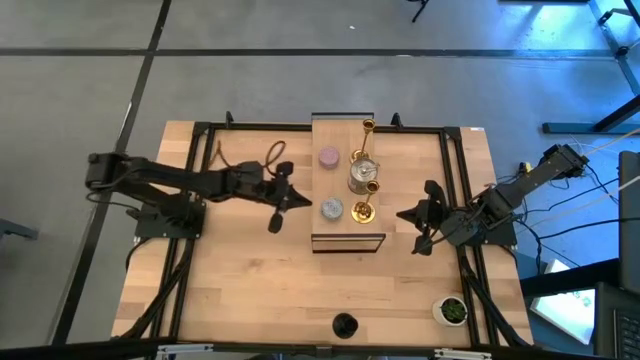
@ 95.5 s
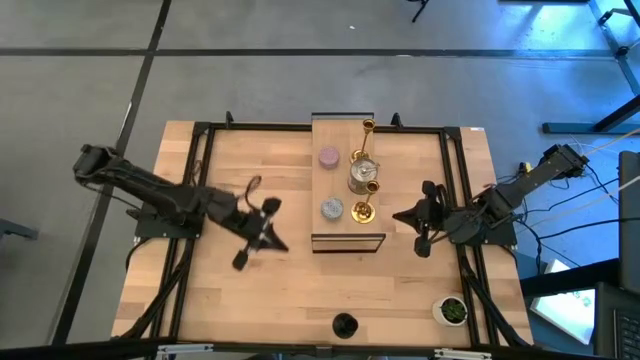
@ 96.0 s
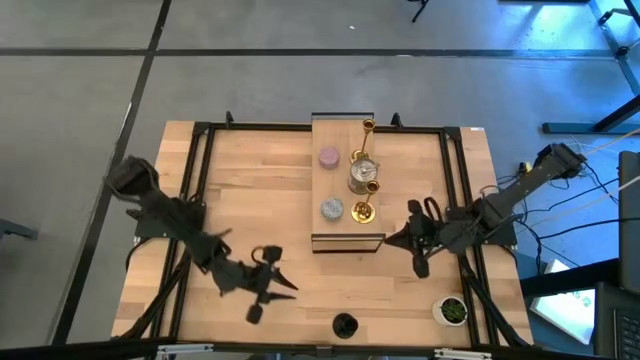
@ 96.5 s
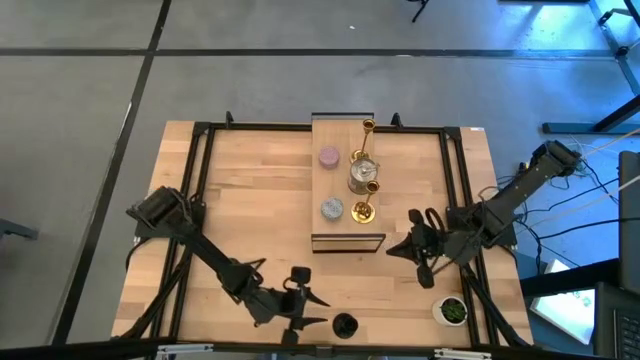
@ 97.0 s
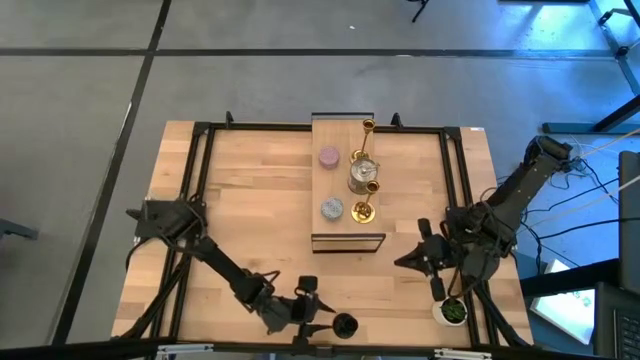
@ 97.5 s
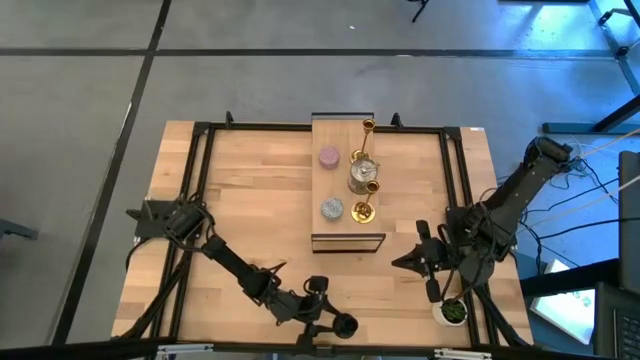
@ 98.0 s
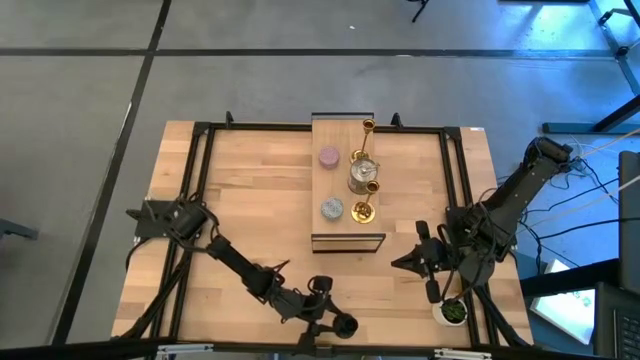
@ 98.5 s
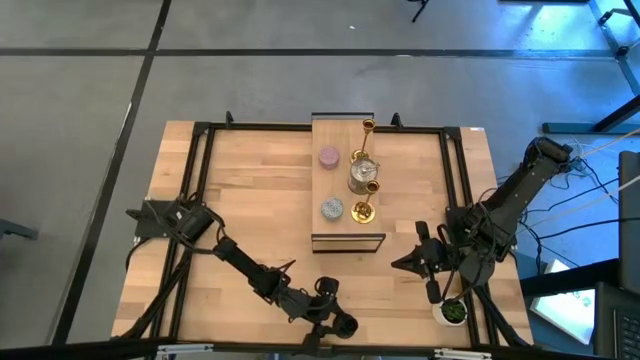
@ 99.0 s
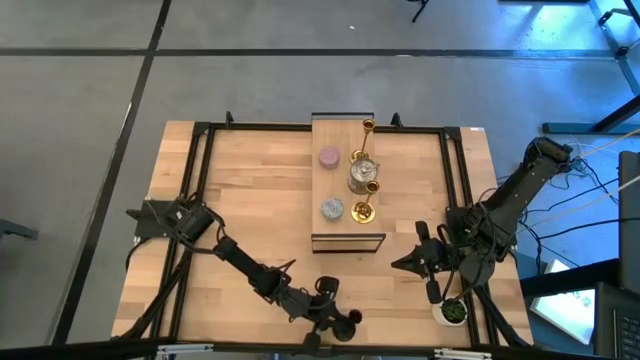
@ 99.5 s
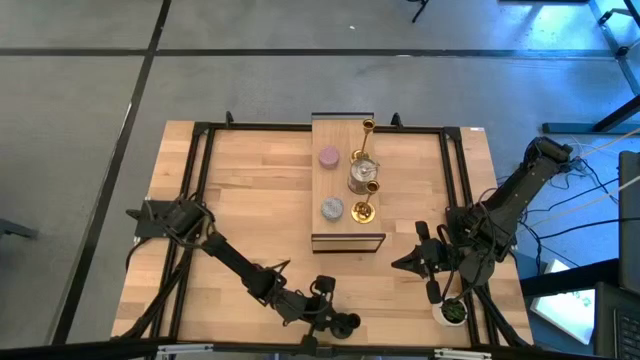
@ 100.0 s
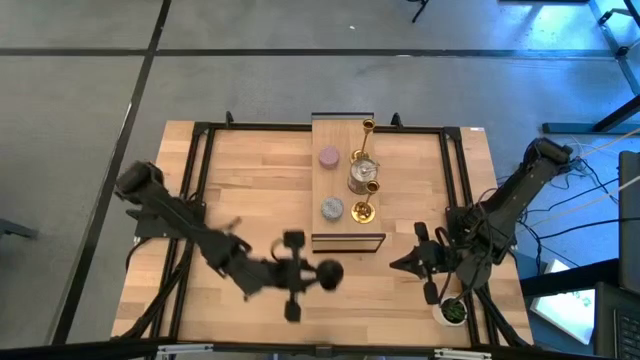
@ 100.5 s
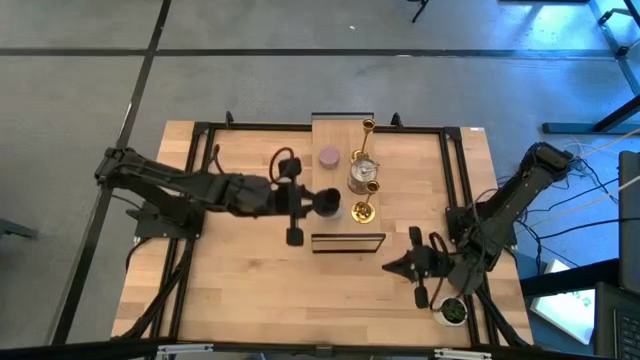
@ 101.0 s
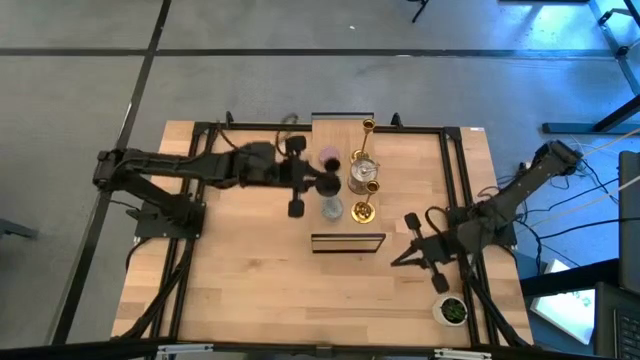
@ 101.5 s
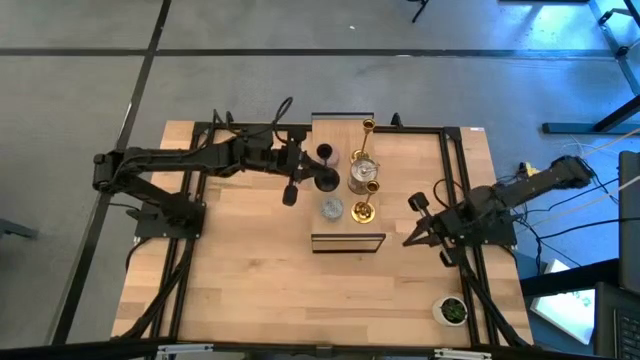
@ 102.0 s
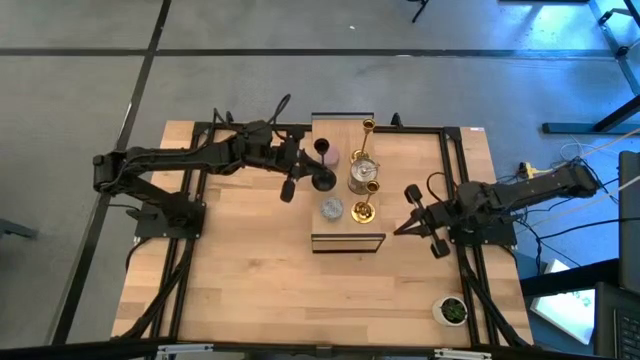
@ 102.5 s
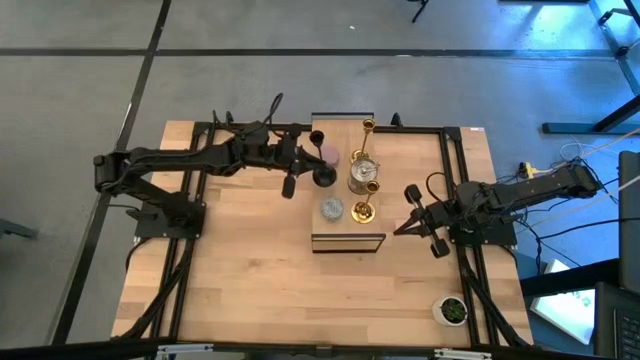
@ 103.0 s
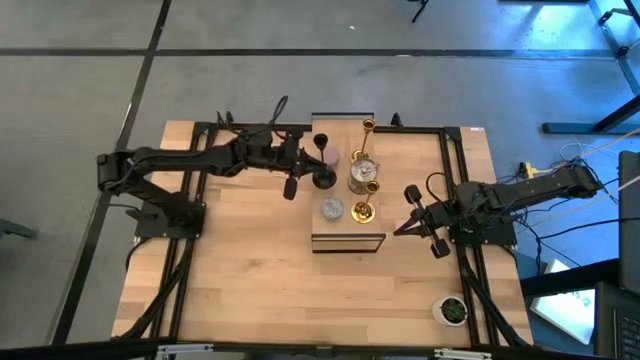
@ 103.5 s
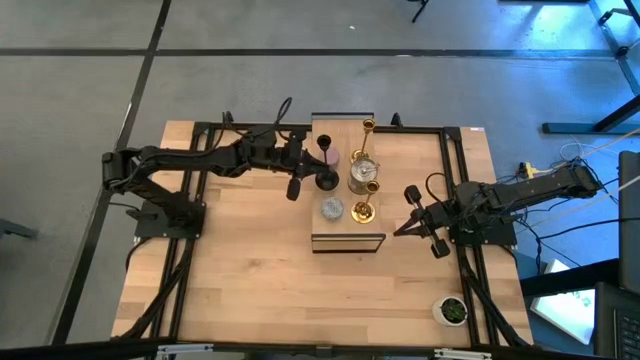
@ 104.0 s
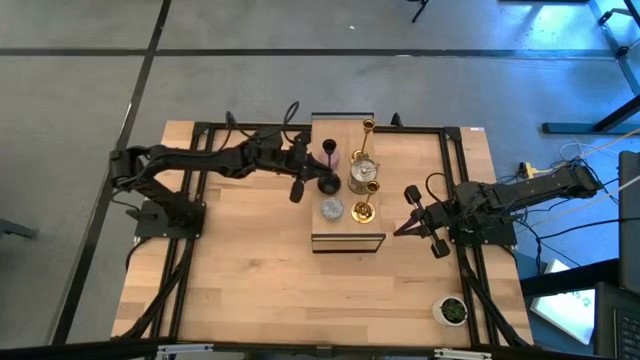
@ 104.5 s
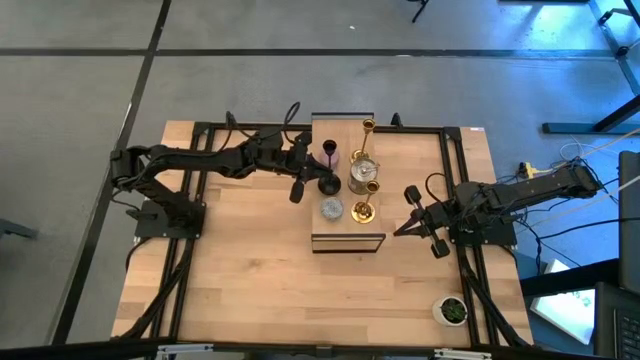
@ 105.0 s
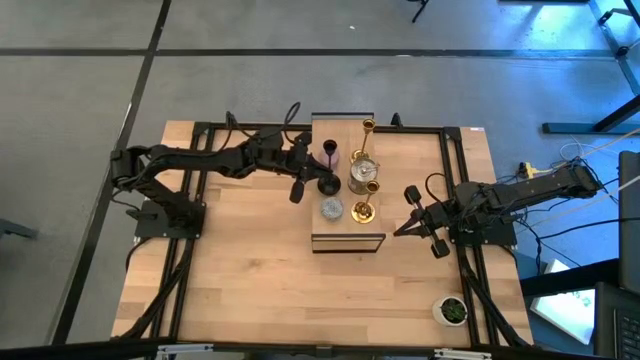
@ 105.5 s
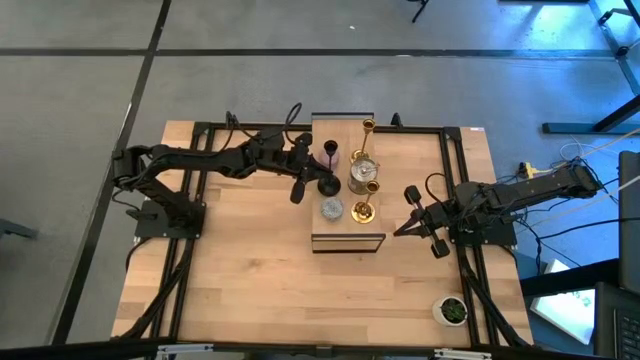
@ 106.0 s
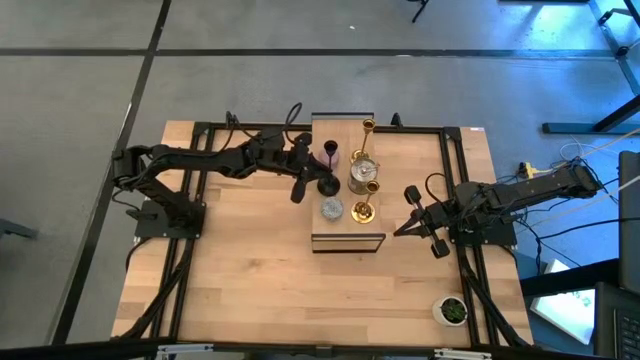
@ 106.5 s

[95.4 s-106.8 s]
Task: Pick & Place candle stick holders
Put the black candle holder on the shelf

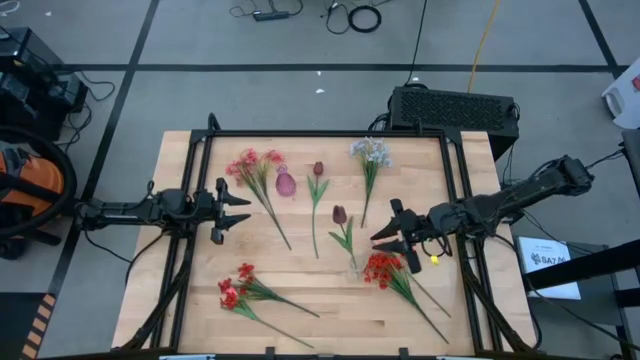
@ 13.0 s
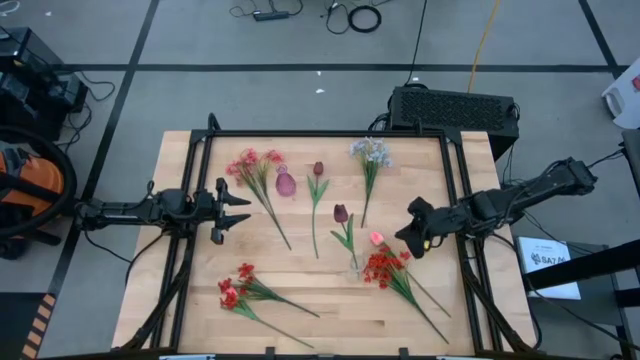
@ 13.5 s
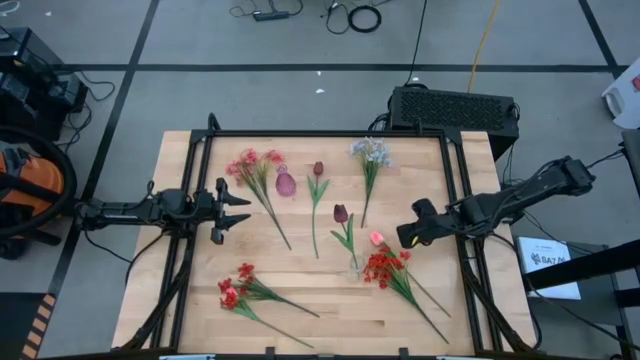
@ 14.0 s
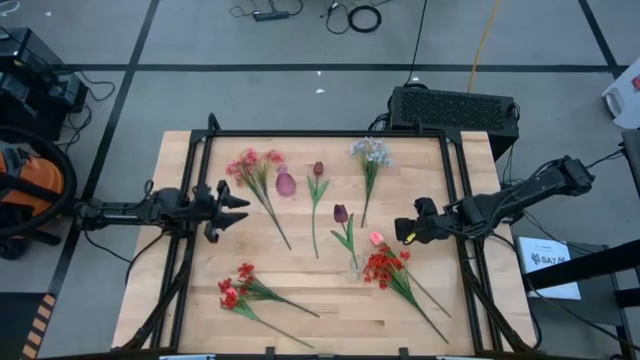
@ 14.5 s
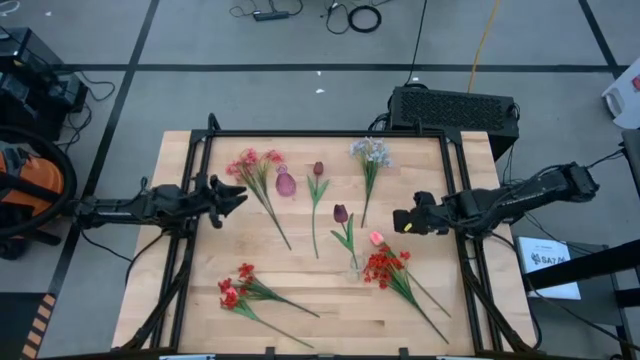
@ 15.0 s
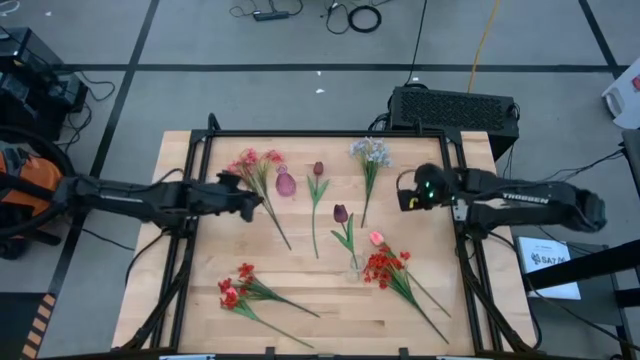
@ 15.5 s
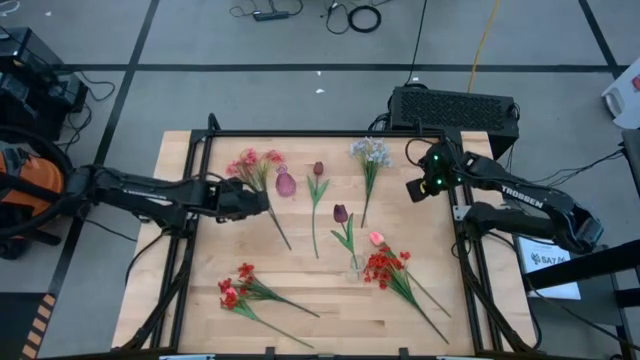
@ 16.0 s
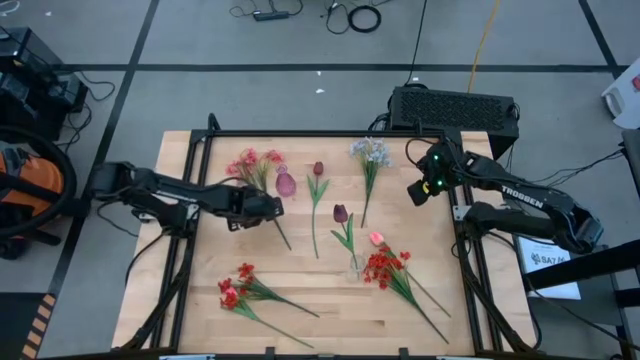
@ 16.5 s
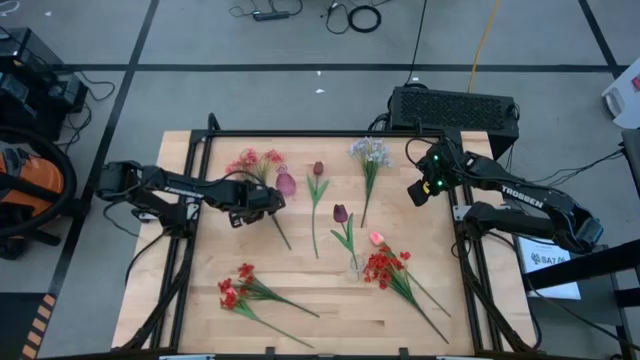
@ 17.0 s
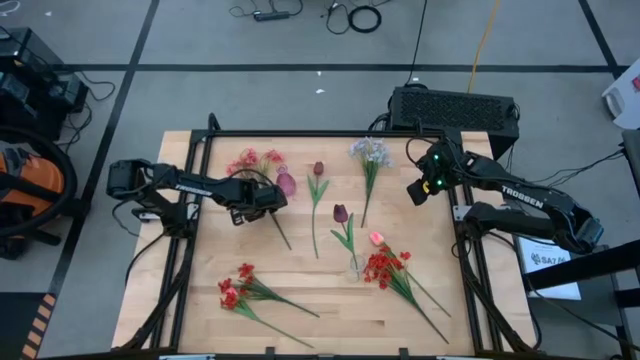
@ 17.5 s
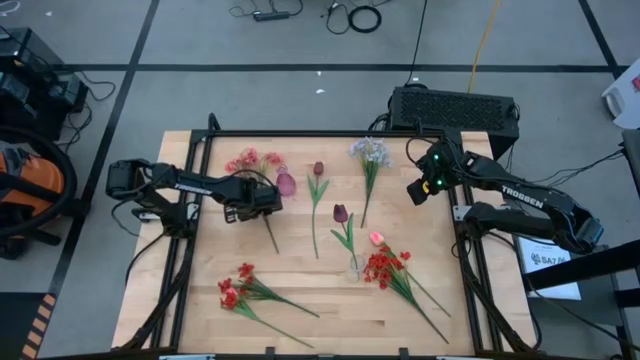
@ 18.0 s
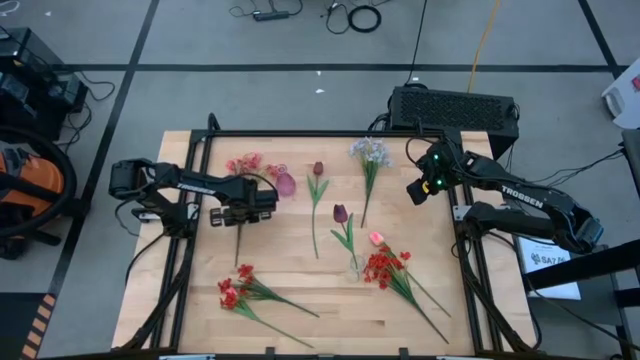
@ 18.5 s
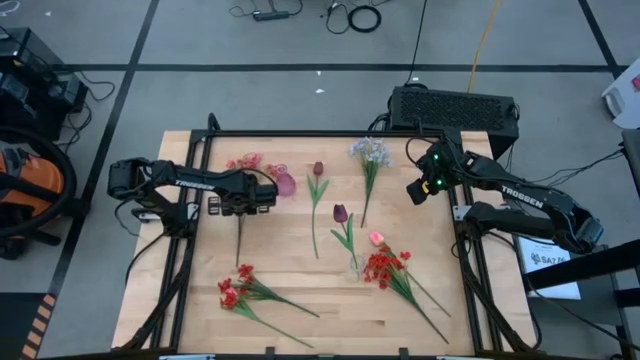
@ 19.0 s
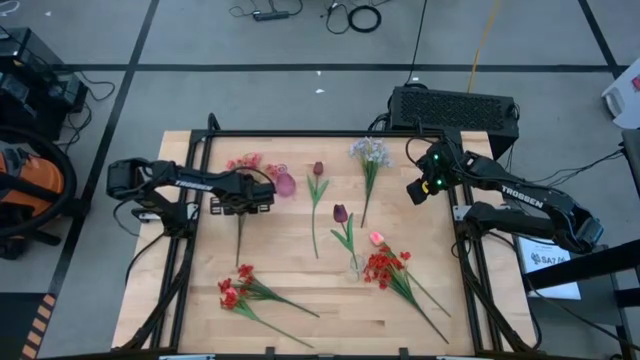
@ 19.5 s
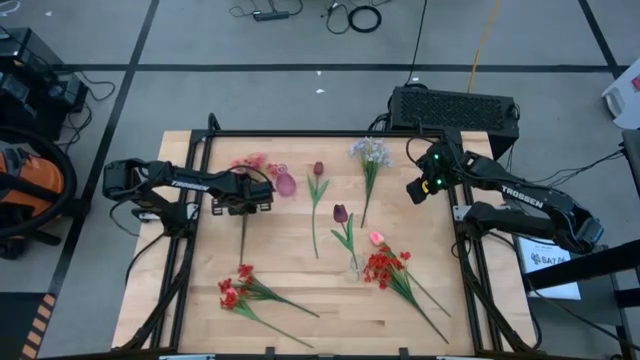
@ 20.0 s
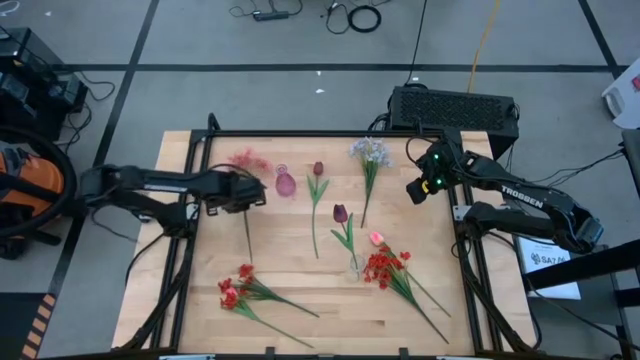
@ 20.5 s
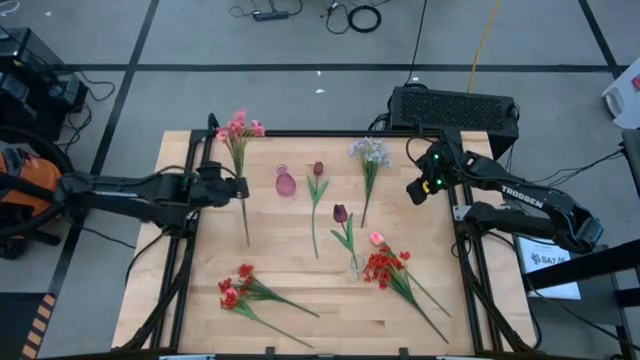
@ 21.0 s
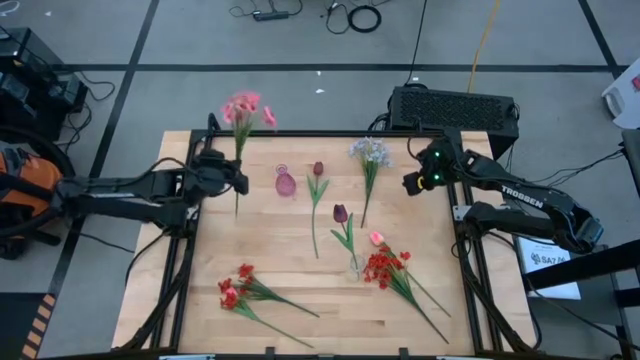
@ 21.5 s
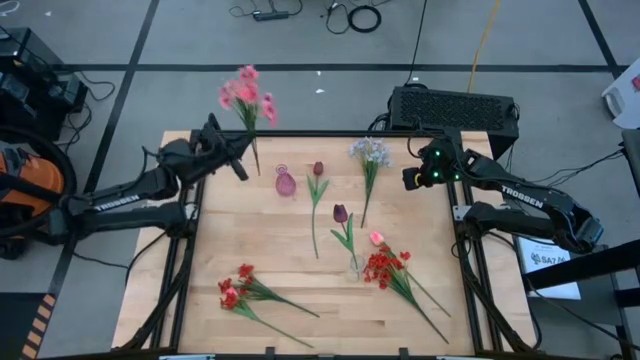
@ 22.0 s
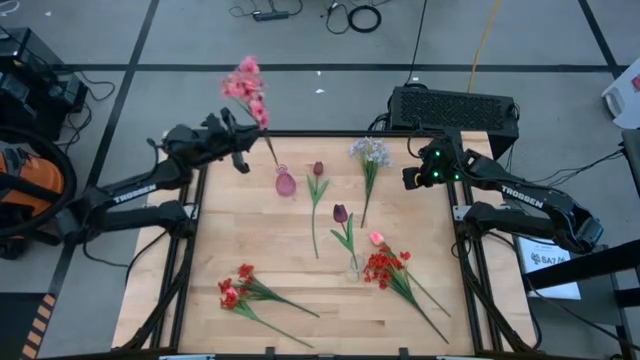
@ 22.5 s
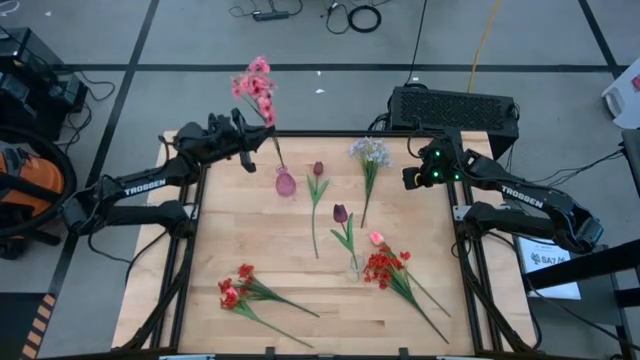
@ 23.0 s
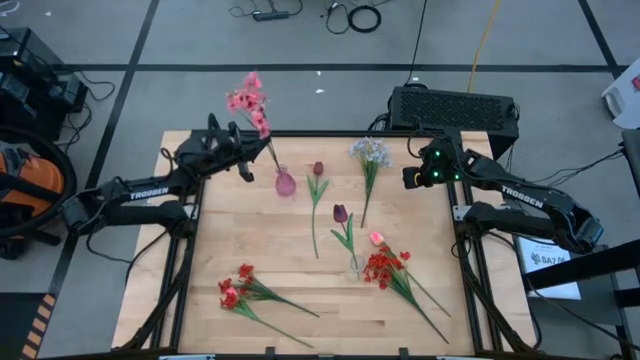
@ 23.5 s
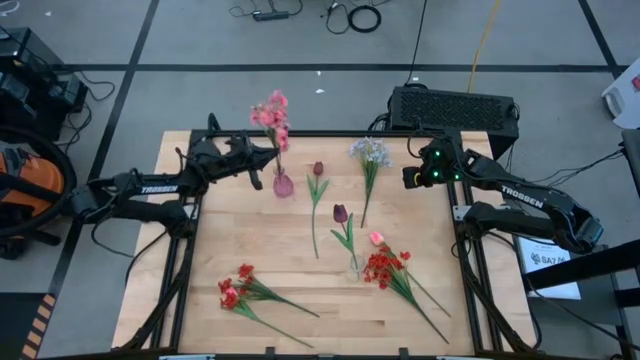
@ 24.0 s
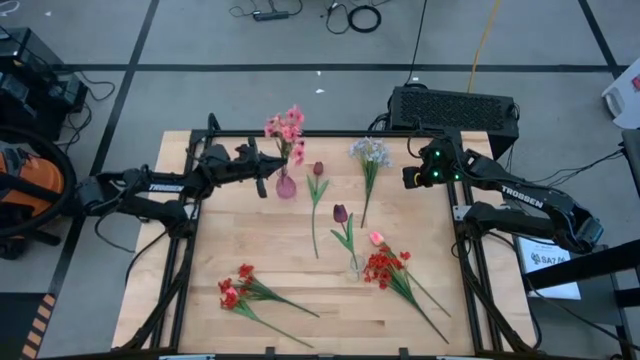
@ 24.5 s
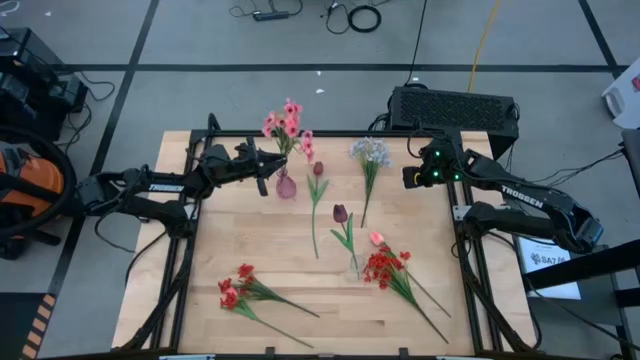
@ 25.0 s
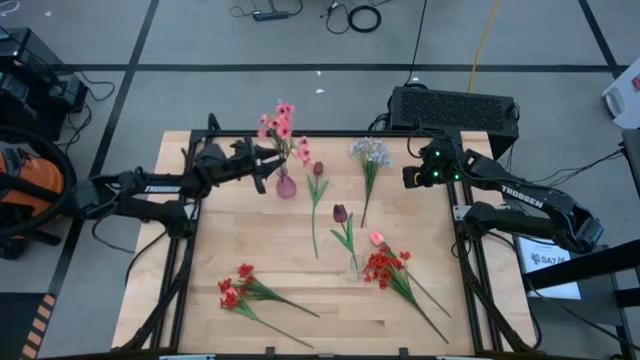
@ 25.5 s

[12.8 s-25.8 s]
Task: Sort flowers into vase by color
Put the pink flowers into the violet flower vase
